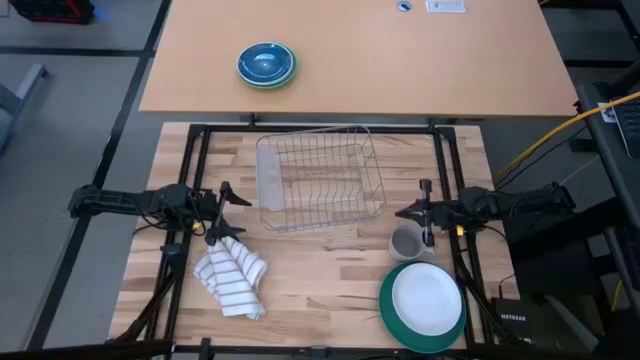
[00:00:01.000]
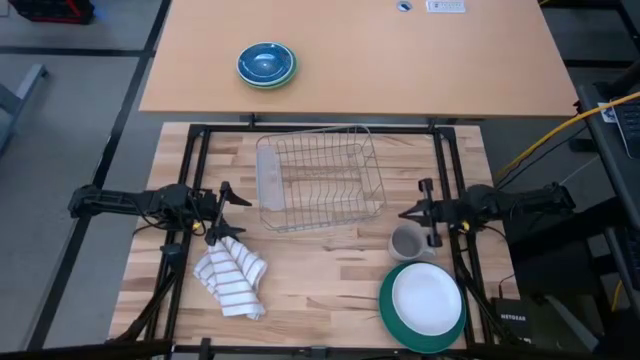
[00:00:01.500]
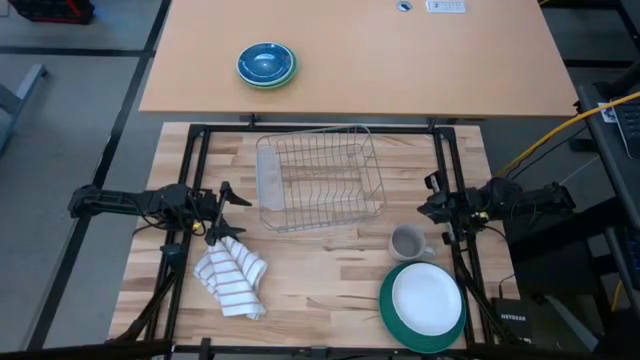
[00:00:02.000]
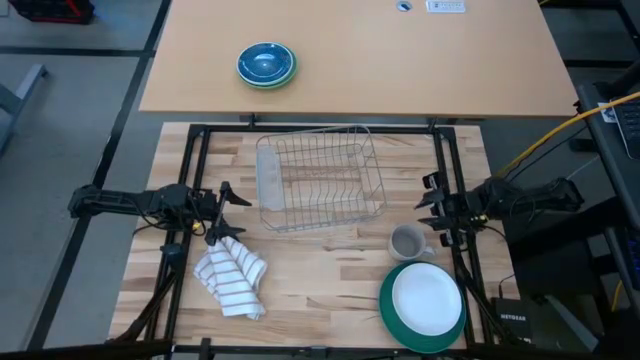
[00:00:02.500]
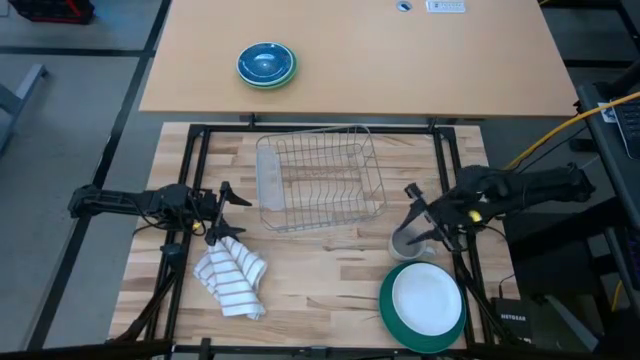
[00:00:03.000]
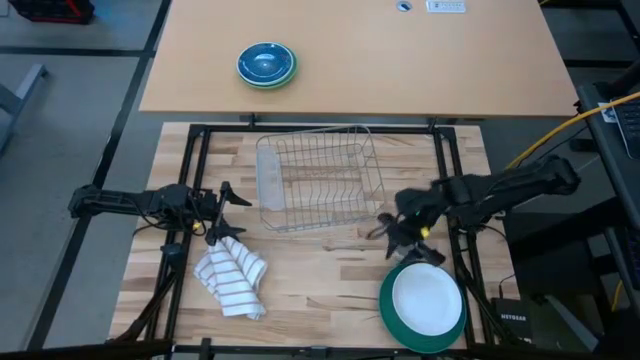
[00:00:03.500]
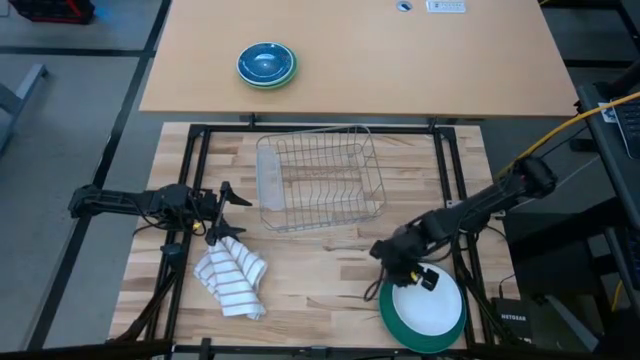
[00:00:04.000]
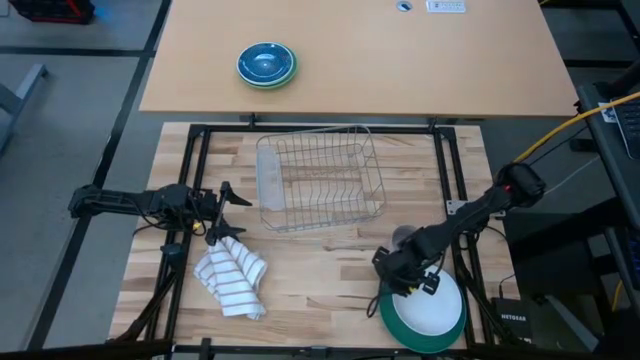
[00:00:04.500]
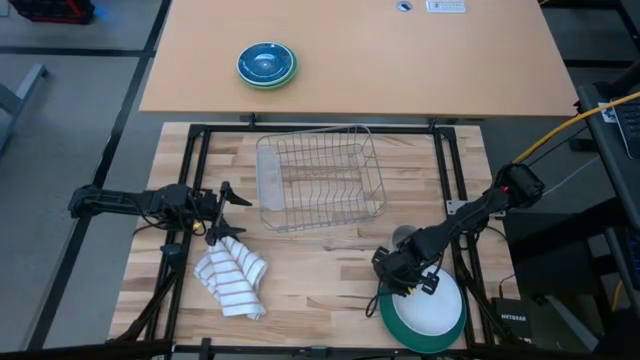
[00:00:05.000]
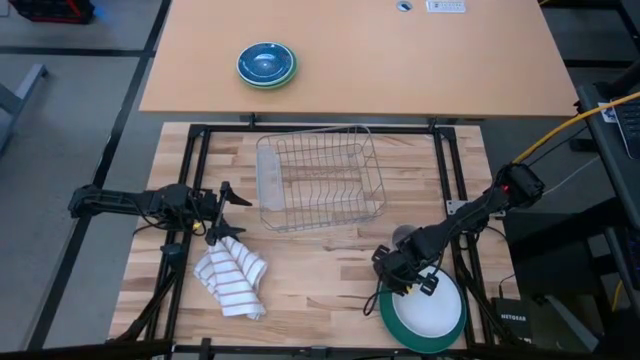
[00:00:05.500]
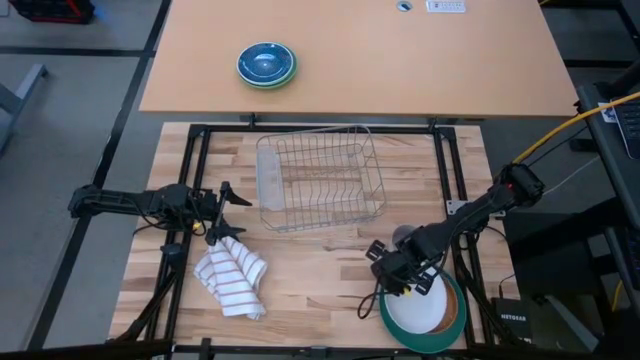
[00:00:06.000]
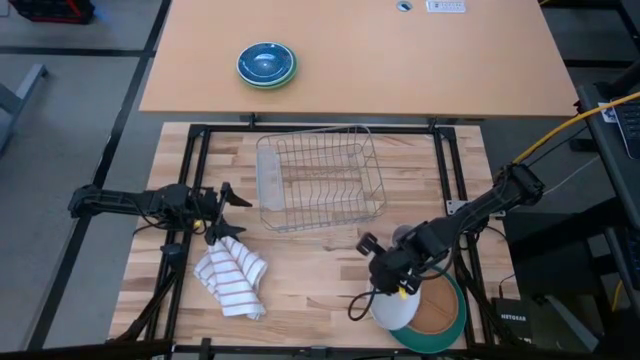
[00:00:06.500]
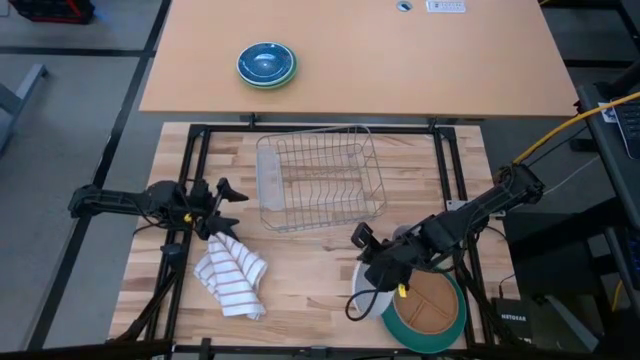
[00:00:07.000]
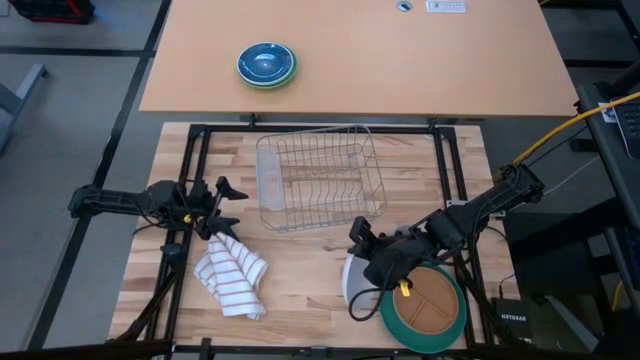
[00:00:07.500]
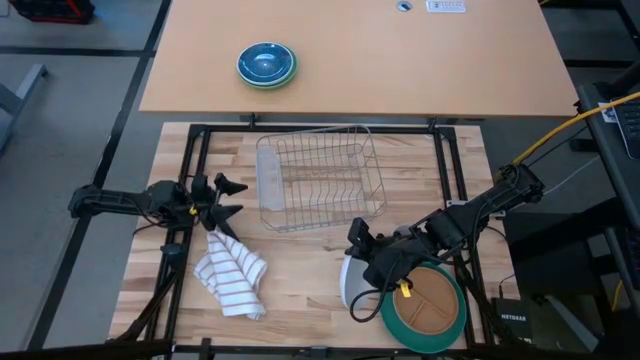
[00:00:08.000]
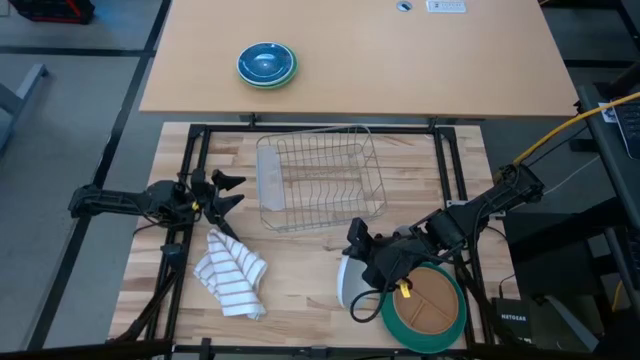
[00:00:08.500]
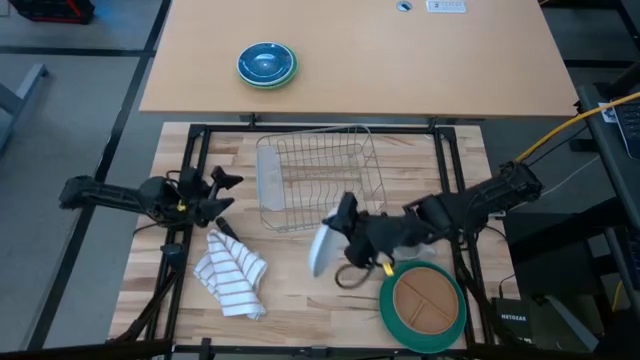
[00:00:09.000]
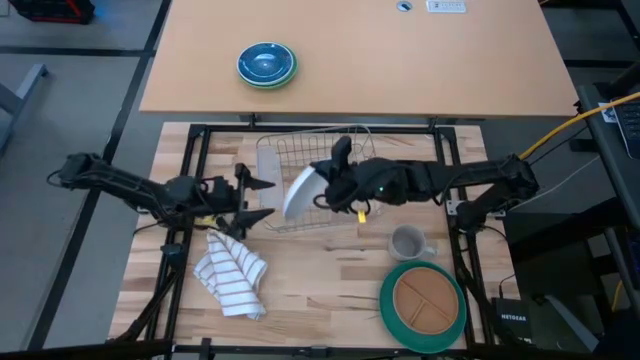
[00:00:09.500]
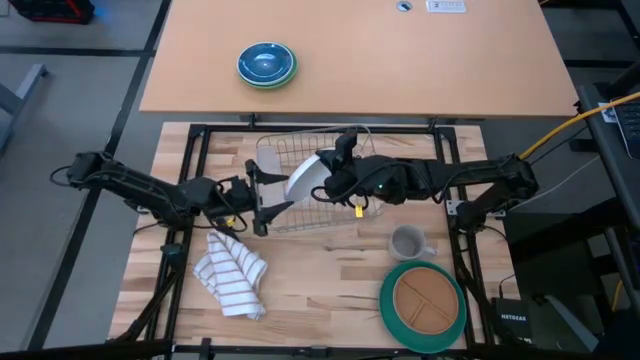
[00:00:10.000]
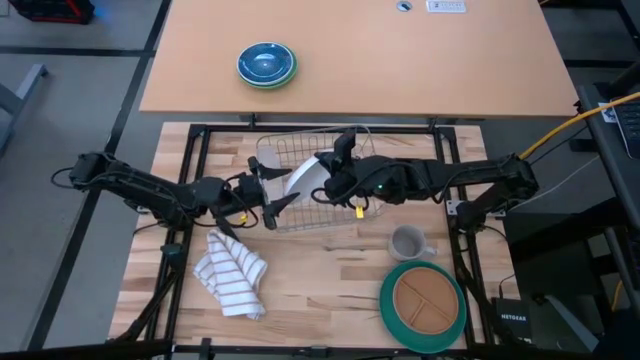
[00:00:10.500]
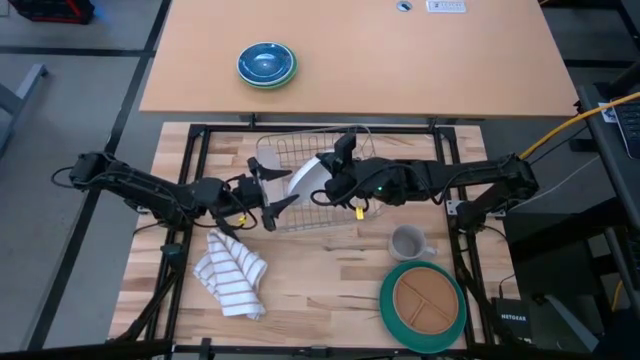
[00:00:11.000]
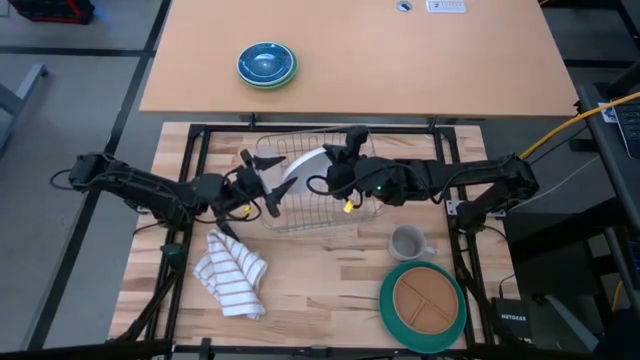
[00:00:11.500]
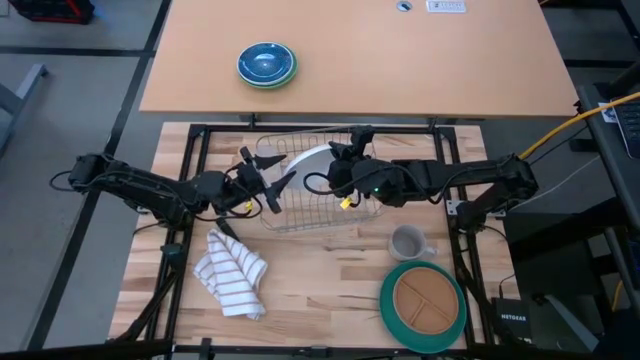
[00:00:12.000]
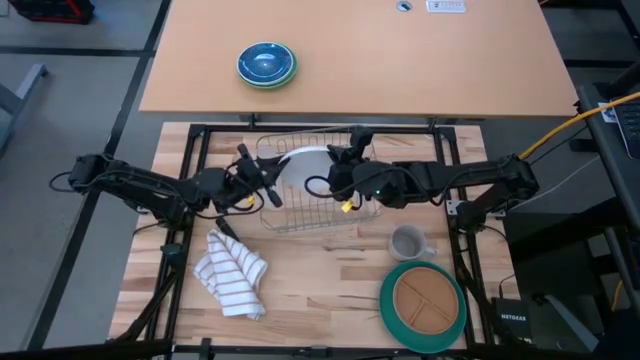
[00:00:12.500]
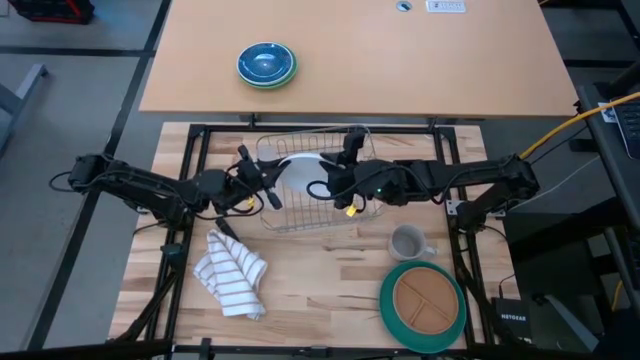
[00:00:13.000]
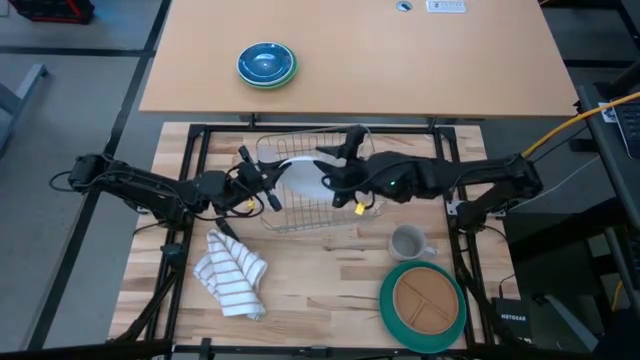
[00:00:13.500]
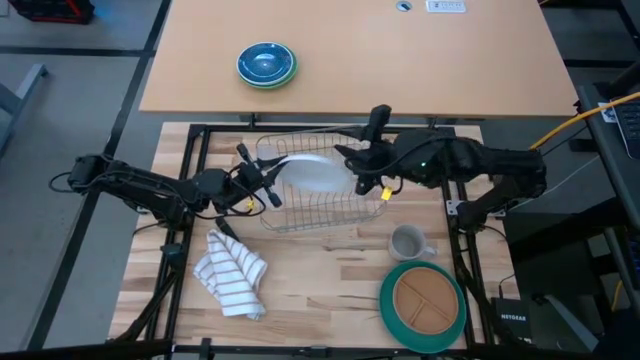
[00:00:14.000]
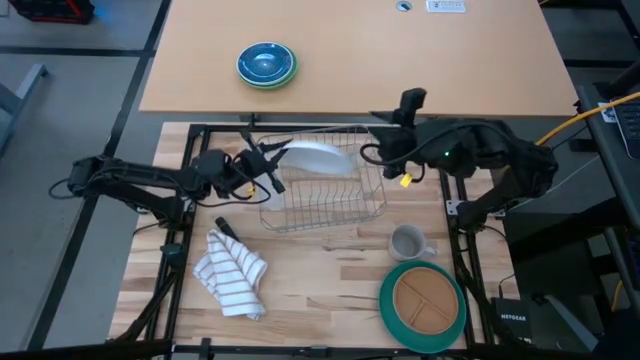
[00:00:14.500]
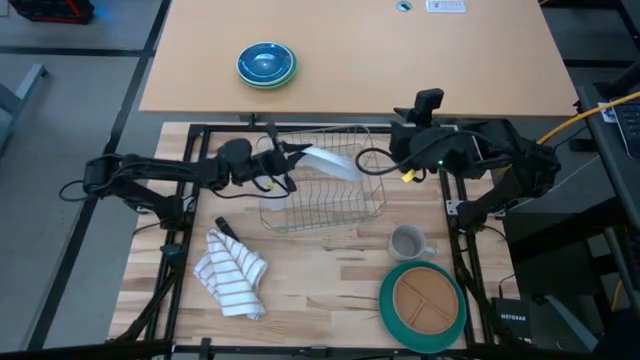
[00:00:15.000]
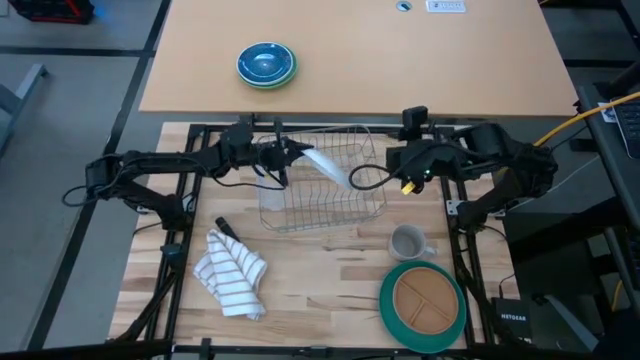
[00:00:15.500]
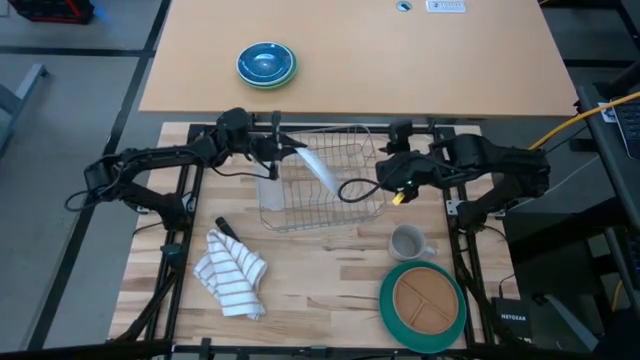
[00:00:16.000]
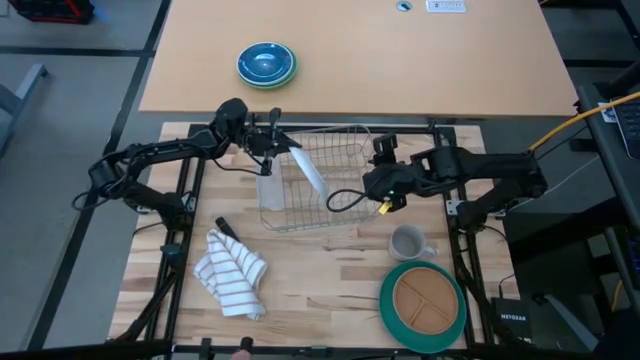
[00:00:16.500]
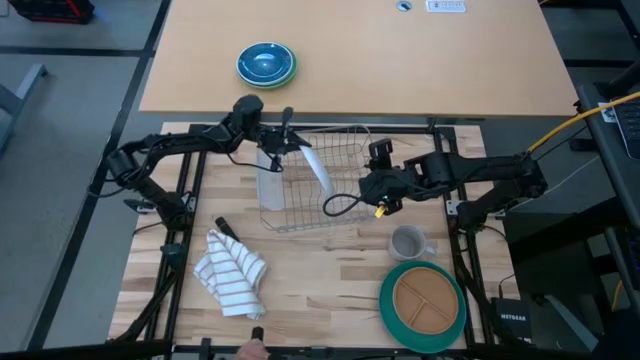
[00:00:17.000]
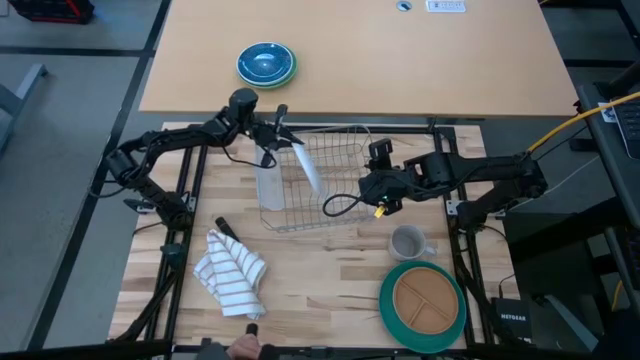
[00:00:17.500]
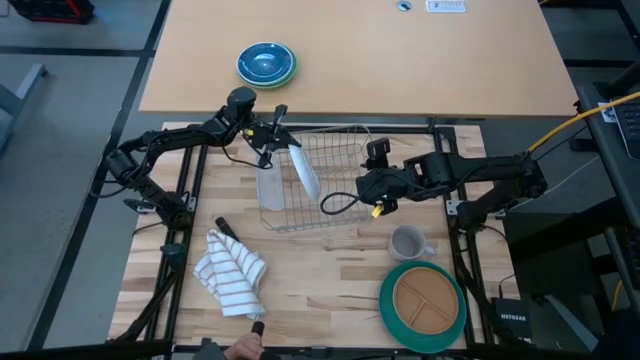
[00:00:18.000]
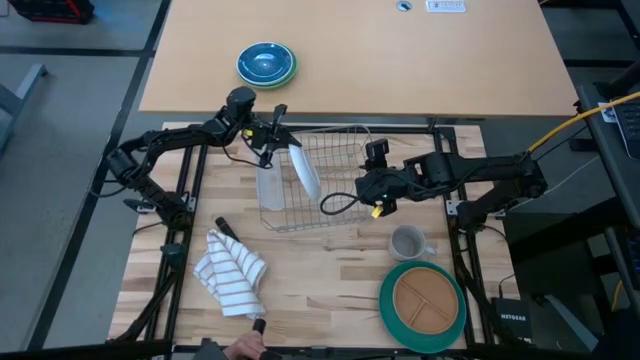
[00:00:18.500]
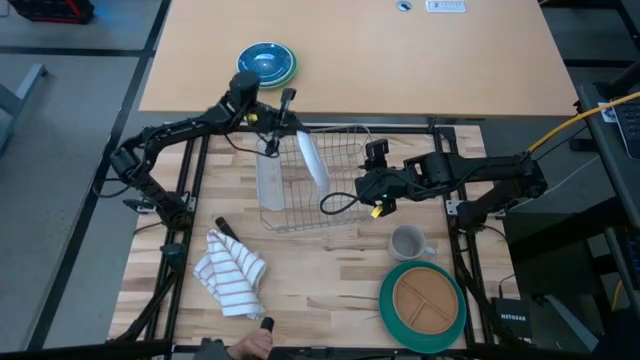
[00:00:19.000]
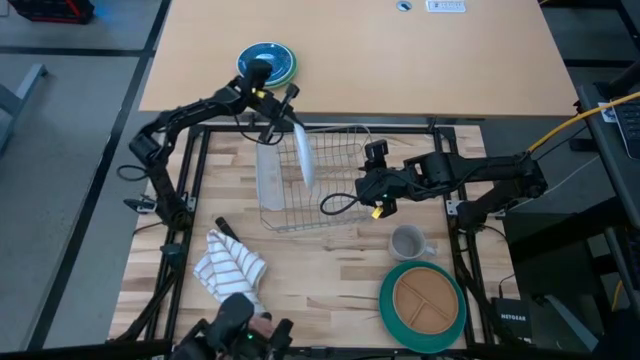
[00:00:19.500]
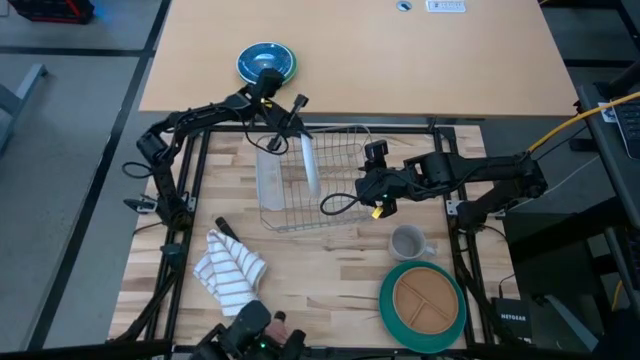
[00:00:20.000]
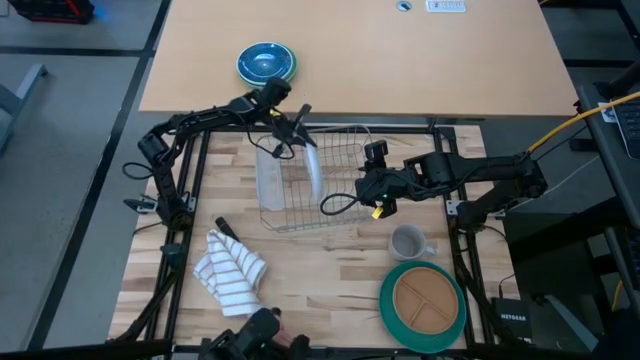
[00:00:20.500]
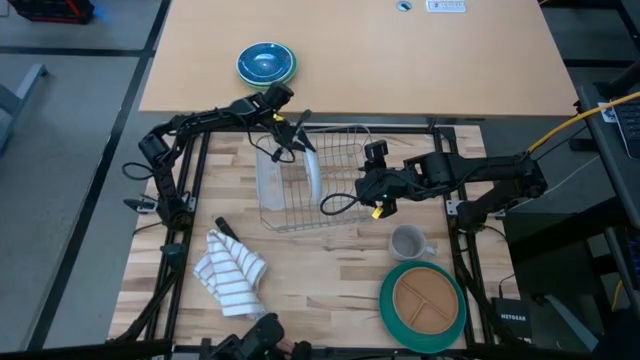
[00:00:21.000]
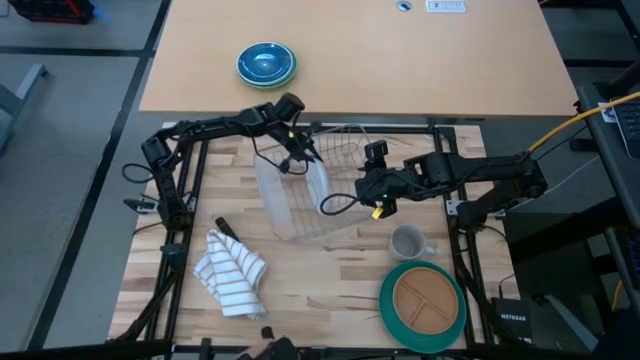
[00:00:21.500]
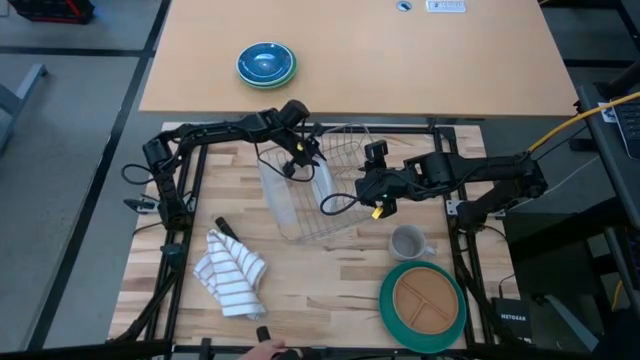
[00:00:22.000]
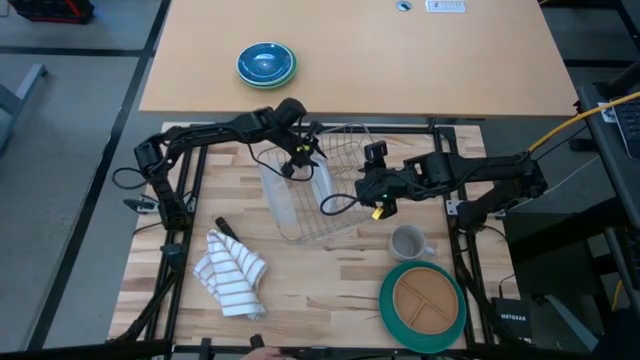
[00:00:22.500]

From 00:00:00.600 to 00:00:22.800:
Task: Sort dishes
Put the white plate in the dish rack
